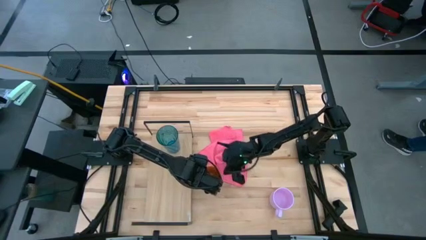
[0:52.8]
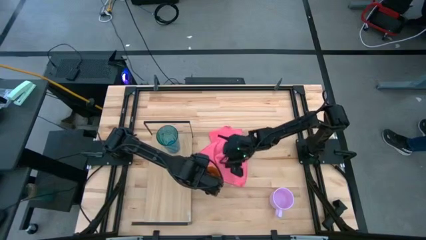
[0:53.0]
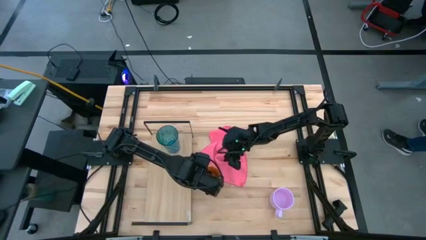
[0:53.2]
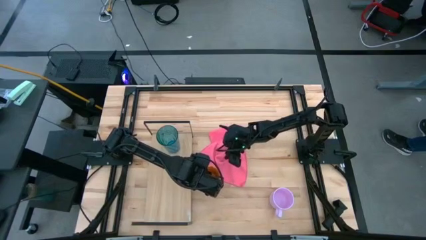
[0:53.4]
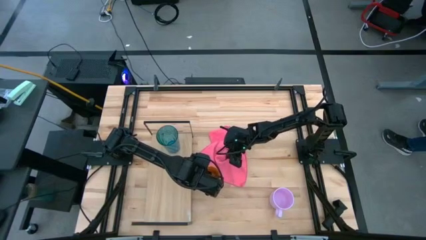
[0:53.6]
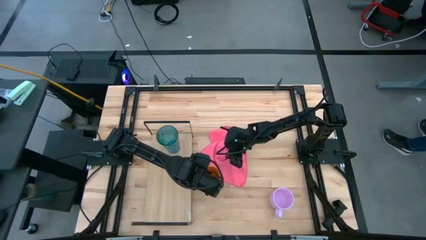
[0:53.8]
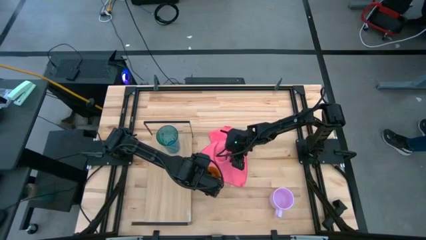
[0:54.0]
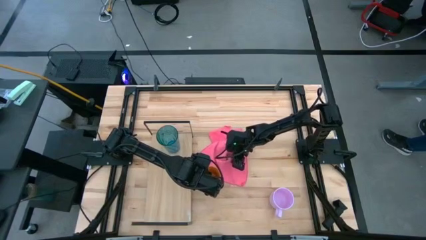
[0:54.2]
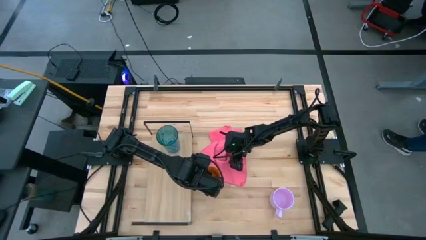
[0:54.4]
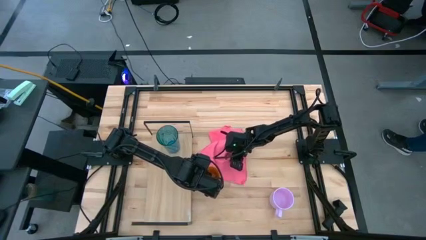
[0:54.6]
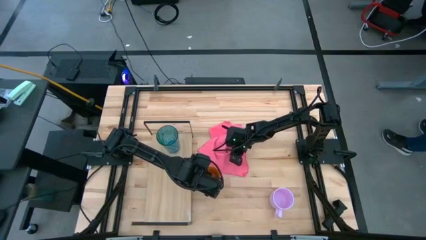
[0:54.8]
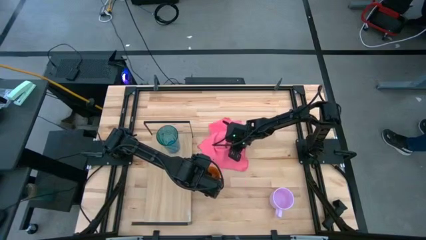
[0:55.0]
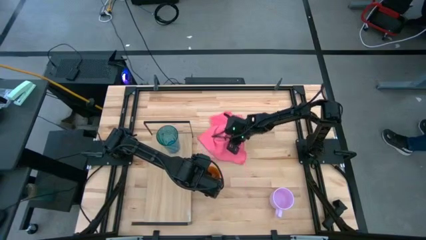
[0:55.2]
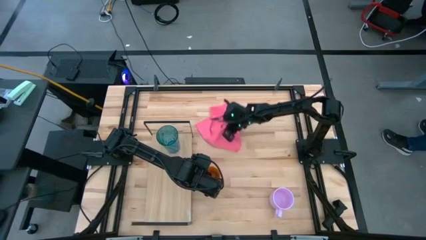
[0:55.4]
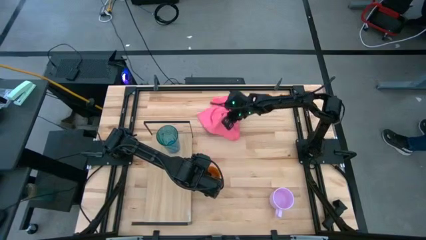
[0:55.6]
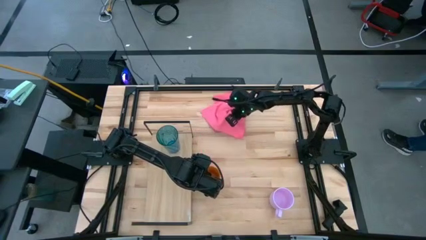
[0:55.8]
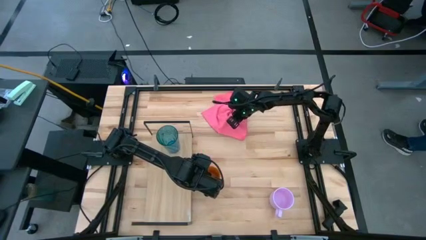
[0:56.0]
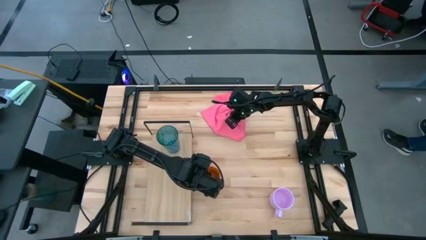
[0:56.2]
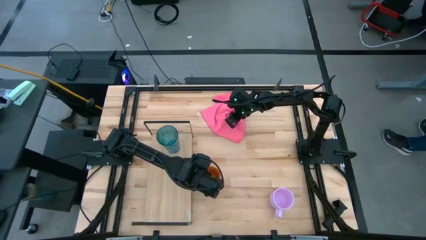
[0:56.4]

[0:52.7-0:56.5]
Task: Stack small to large cups/mugs on shelf
Move the pink towel to the upper middle of the table

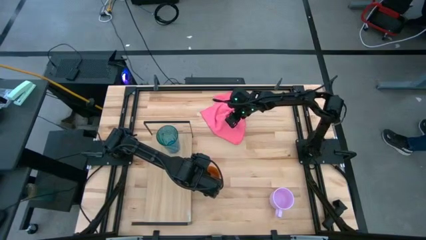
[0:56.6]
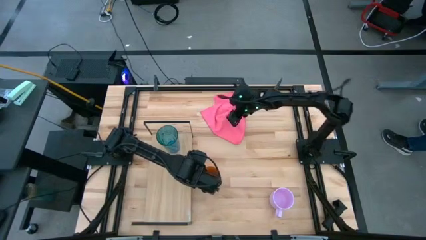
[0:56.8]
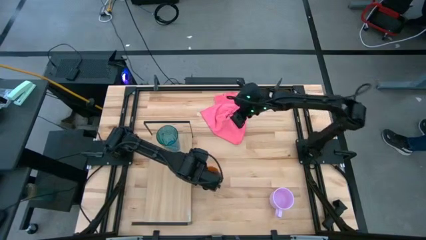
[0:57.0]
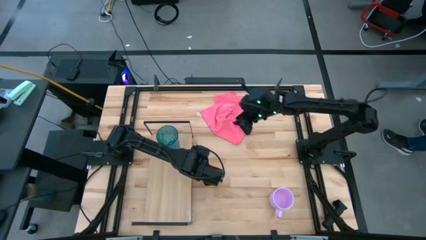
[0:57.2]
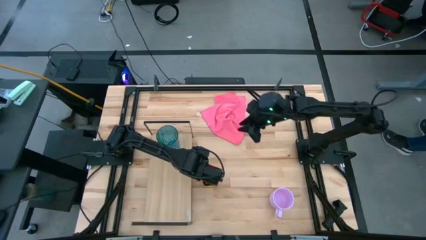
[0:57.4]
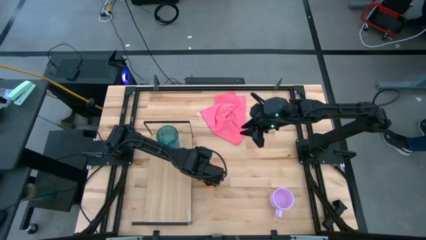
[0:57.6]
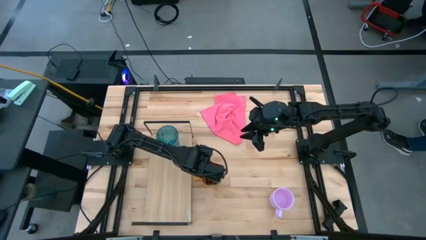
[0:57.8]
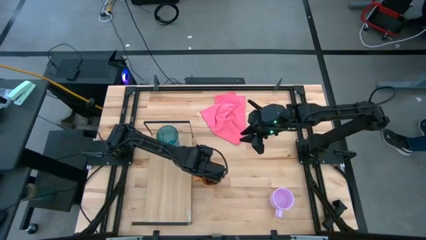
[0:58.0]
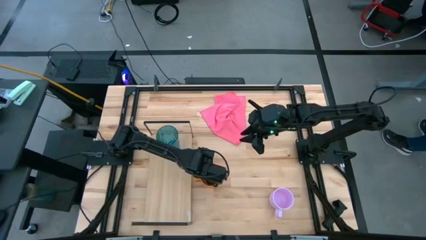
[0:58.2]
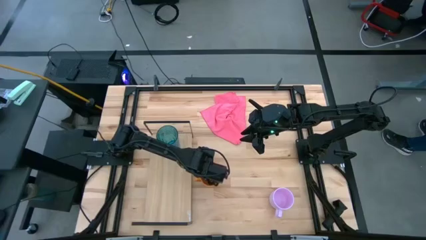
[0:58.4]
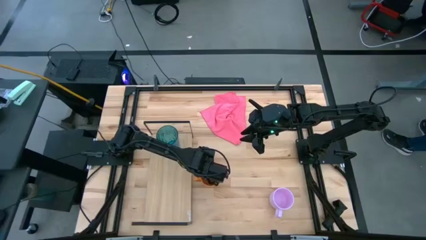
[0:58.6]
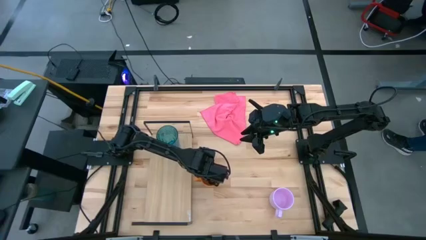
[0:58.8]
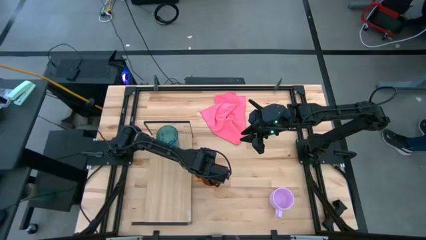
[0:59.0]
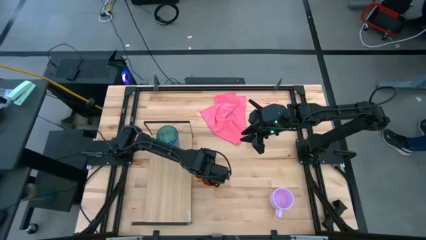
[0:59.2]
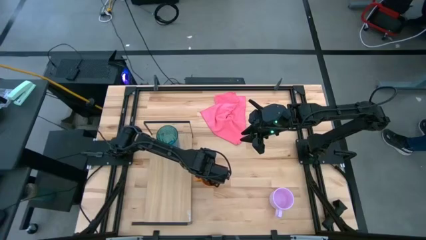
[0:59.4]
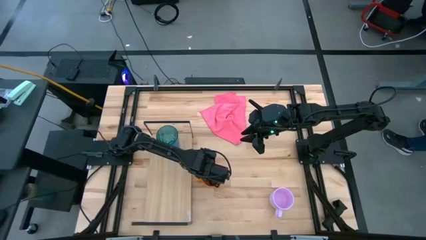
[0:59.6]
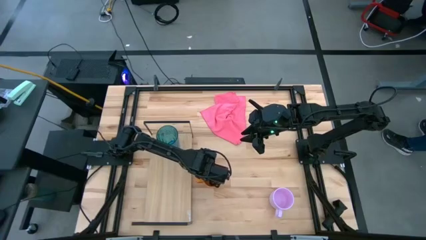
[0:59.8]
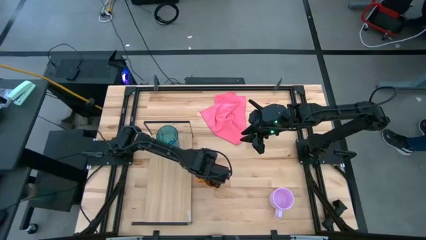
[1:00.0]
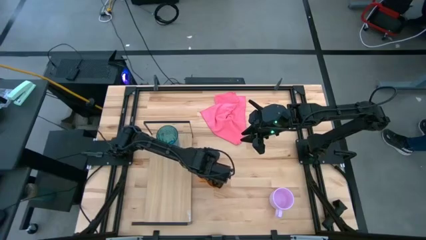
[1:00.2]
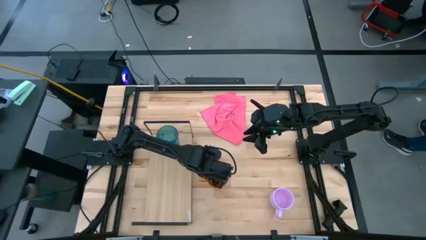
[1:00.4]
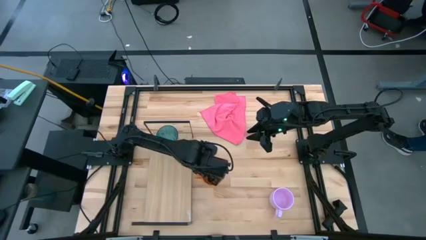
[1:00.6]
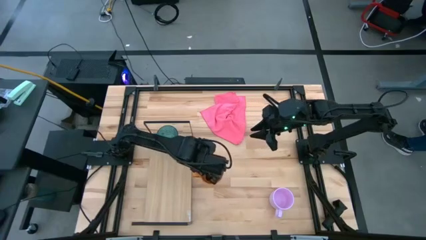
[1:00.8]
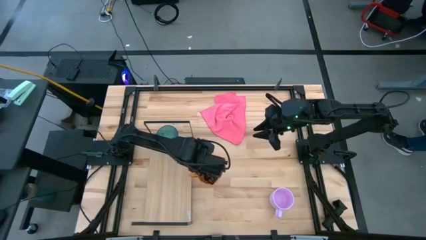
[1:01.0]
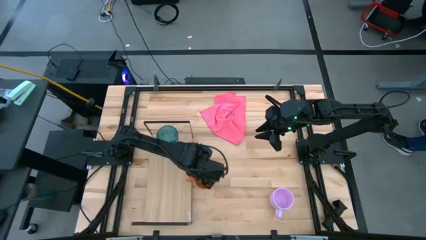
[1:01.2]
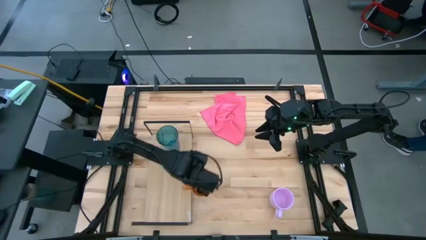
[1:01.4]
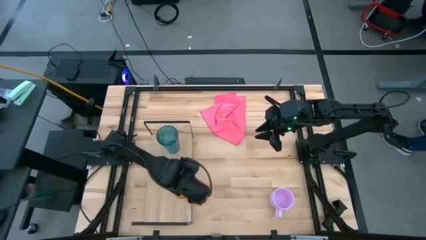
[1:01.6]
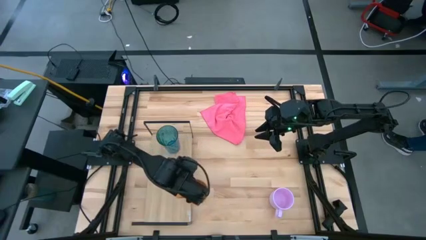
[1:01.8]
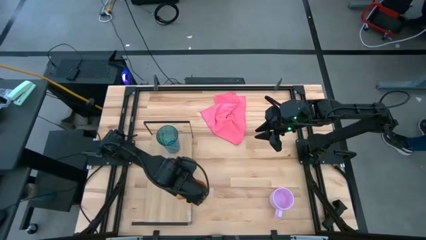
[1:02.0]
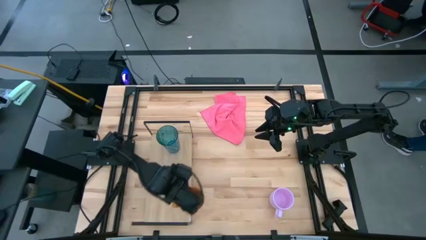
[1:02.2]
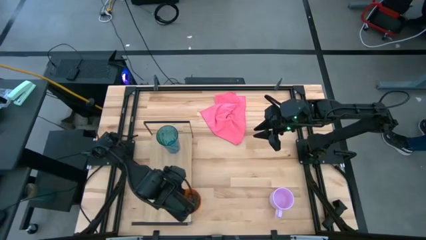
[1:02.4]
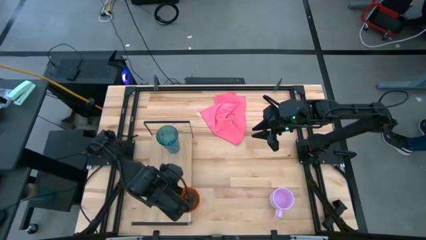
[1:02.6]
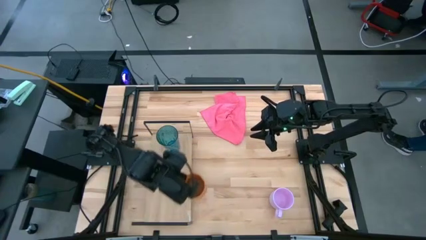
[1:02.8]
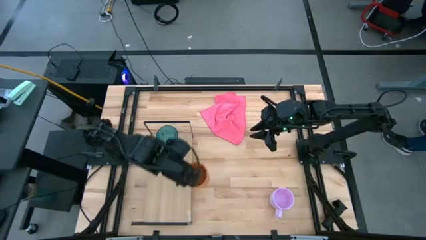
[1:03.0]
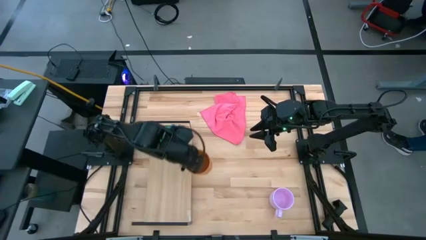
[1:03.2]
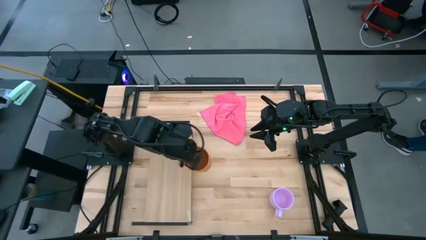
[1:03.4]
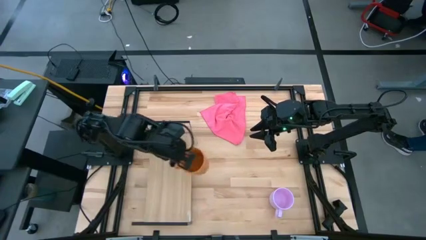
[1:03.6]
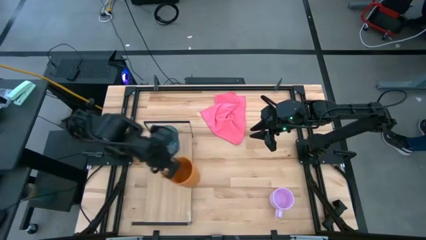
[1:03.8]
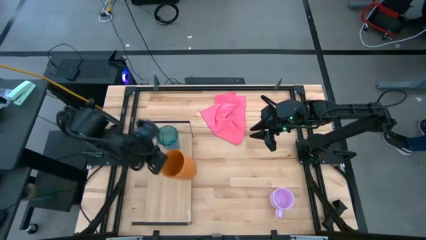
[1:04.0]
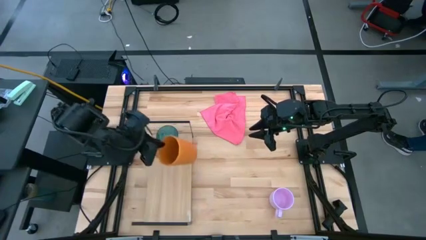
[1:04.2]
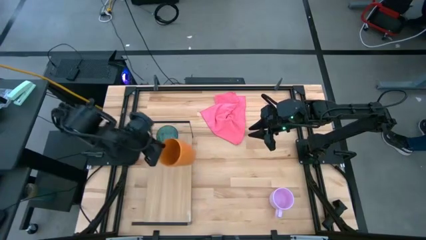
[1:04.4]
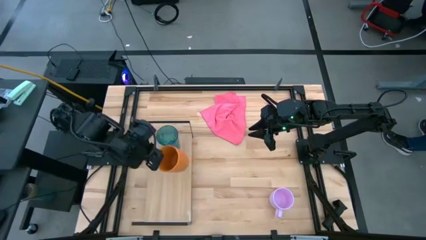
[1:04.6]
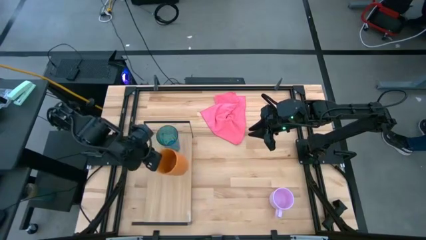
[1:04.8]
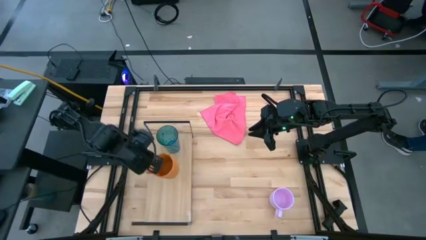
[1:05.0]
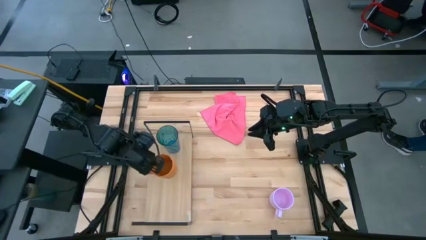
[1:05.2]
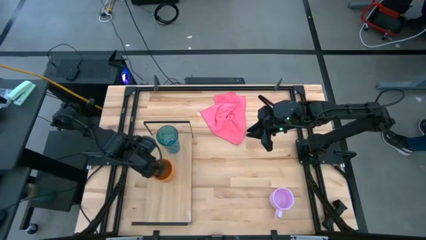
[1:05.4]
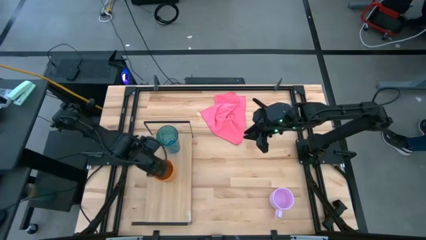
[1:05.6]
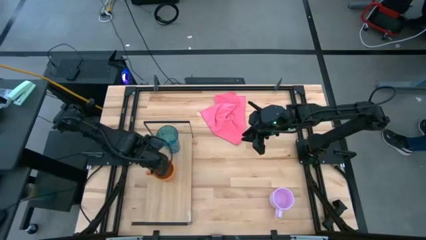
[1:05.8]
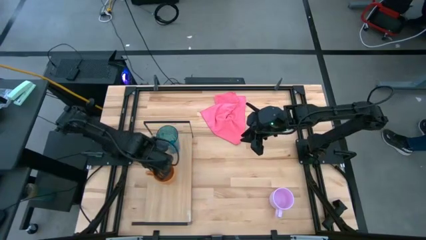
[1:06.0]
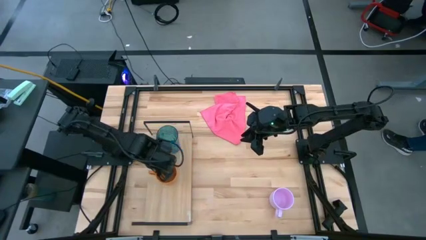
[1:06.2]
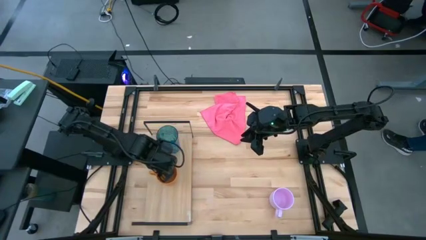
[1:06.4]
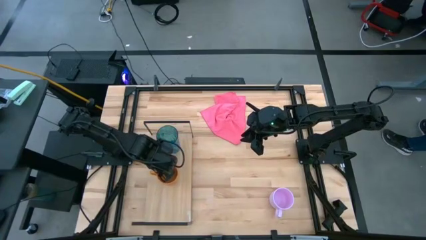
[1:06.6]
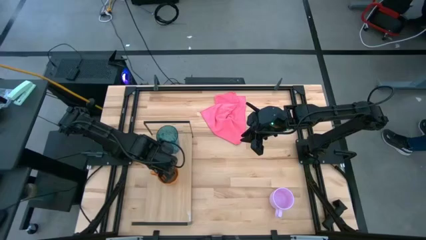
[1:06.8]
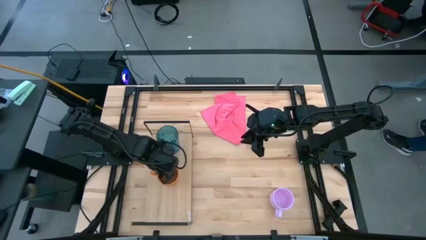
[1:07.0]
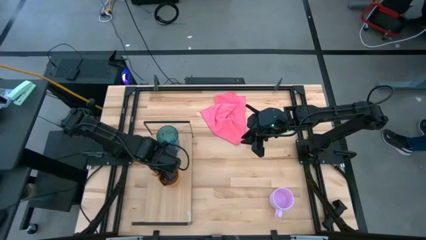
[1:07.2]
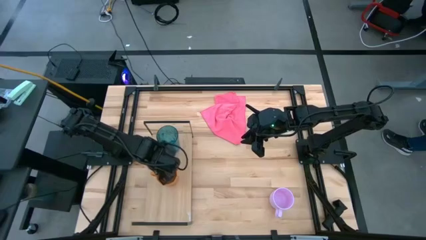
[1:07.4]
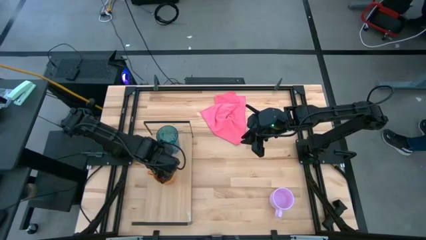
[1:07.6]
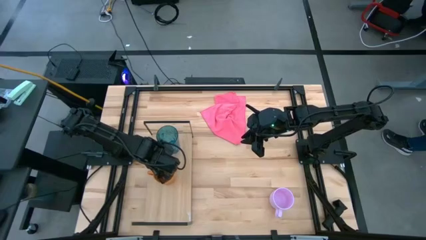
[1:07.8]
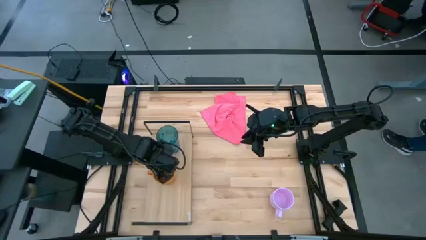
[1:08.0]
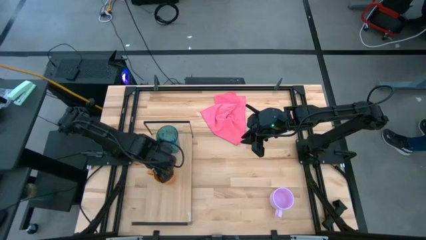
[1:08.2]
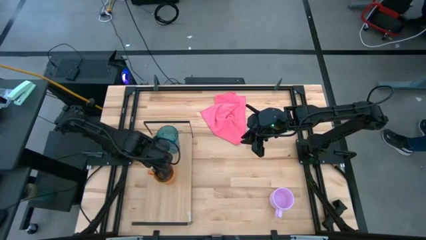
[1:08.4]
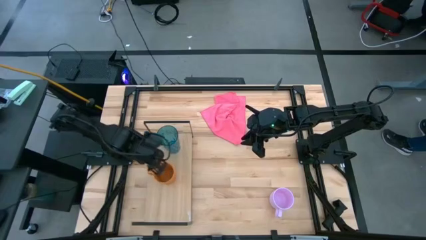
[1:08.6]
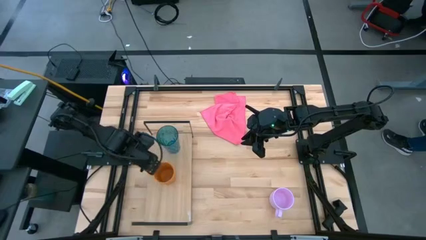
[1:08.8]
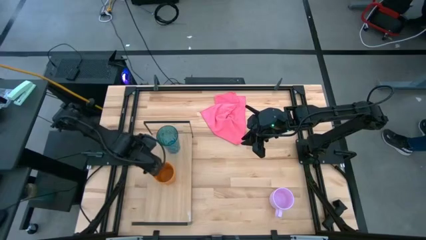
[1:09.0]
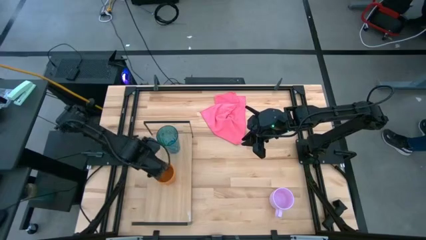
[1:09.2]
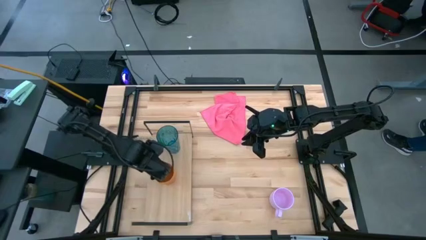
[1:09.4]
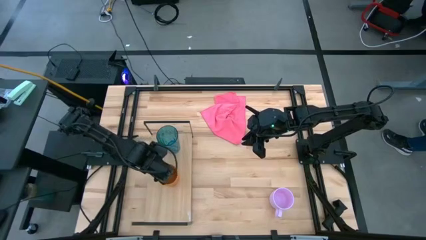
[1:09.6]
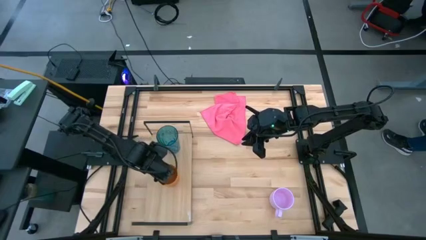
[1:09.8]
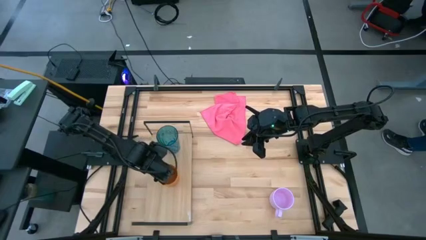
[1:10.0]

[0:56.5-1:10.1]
Put the orange cup on the shelf
